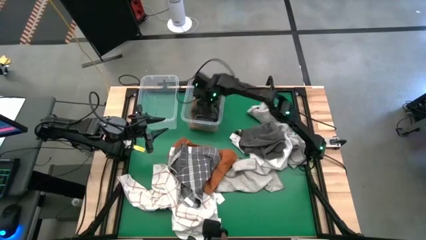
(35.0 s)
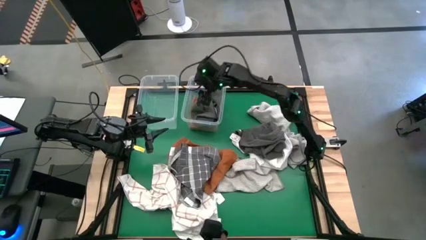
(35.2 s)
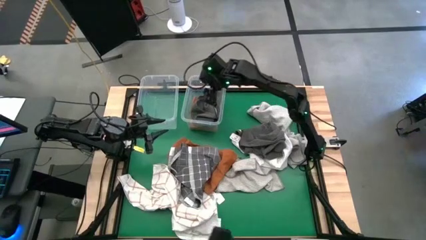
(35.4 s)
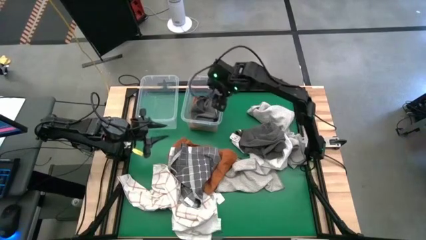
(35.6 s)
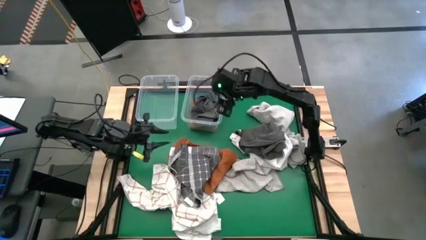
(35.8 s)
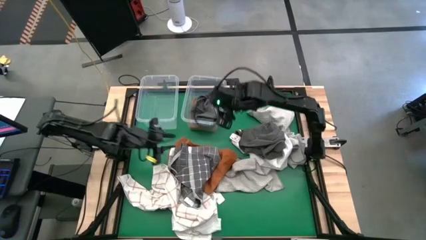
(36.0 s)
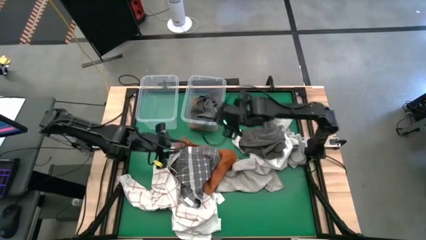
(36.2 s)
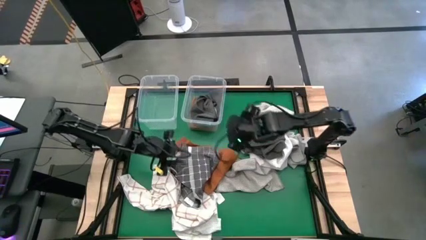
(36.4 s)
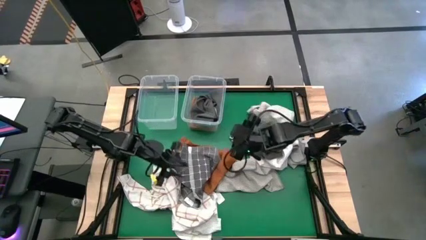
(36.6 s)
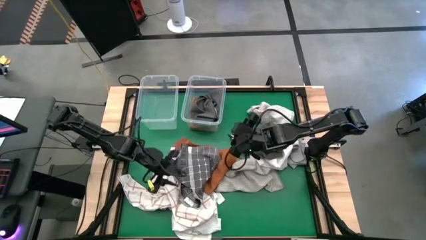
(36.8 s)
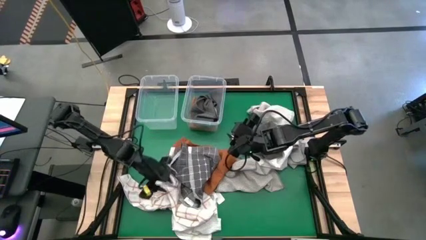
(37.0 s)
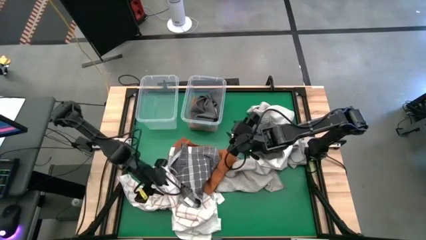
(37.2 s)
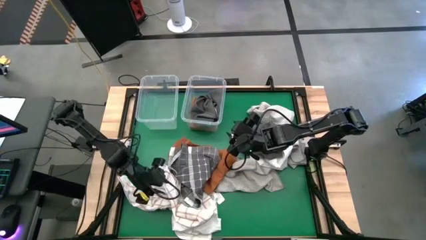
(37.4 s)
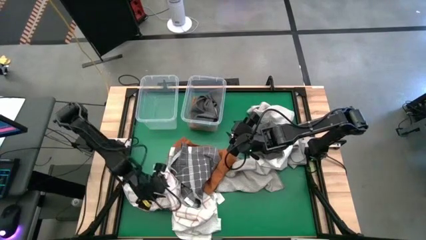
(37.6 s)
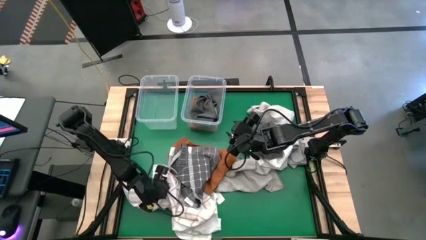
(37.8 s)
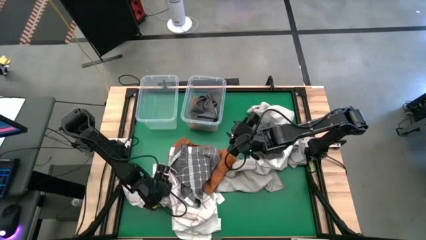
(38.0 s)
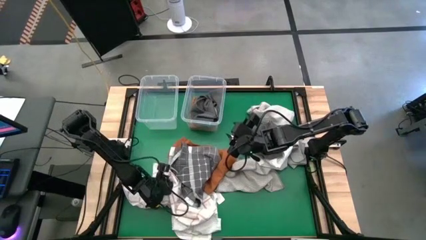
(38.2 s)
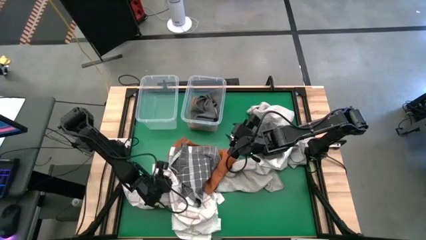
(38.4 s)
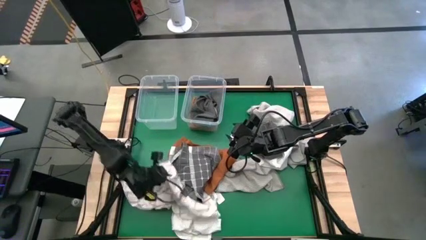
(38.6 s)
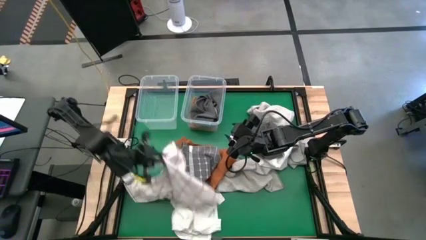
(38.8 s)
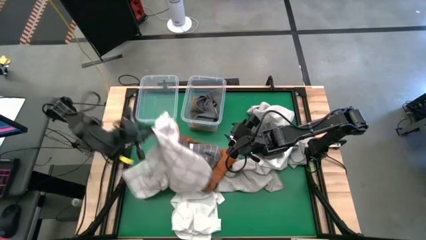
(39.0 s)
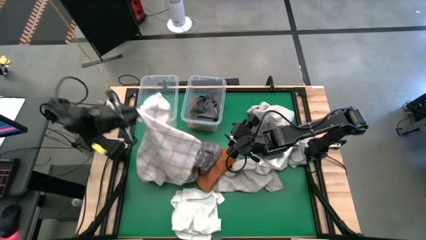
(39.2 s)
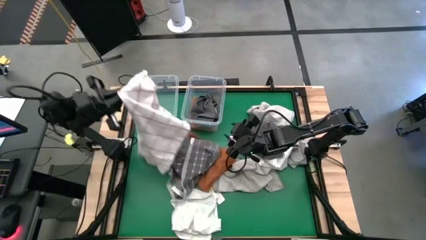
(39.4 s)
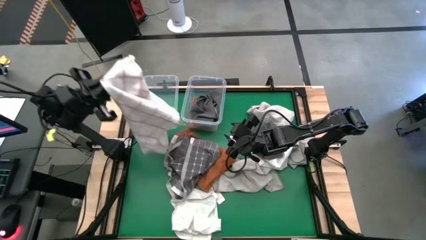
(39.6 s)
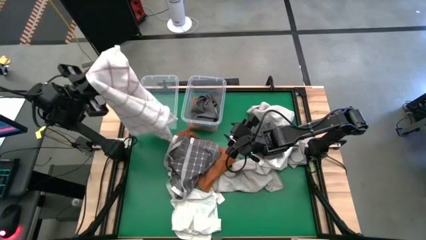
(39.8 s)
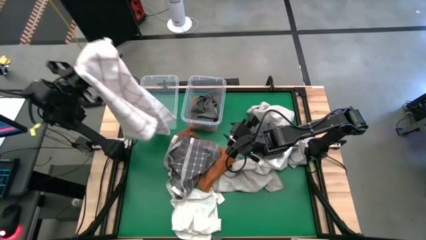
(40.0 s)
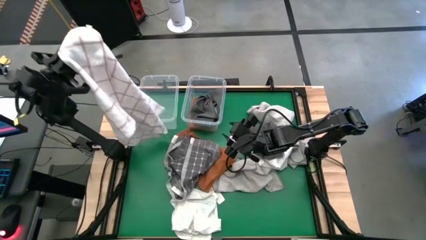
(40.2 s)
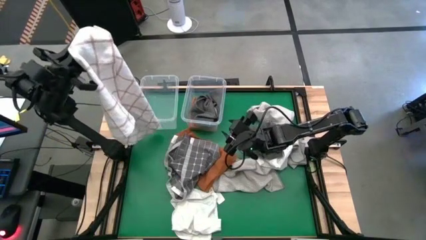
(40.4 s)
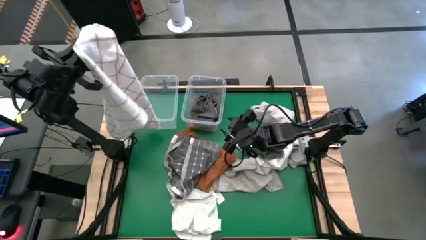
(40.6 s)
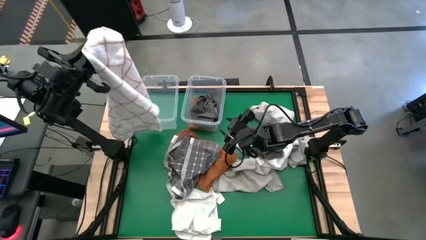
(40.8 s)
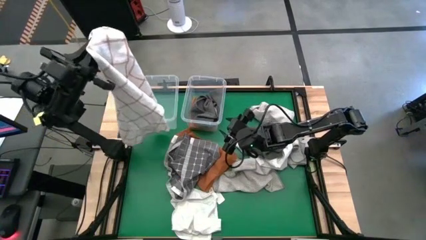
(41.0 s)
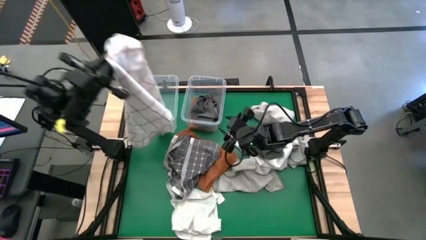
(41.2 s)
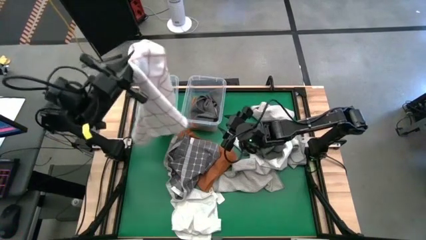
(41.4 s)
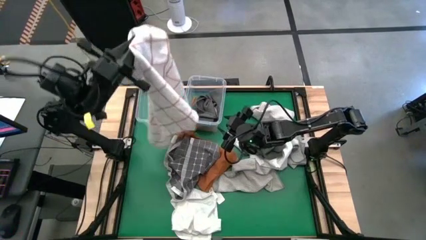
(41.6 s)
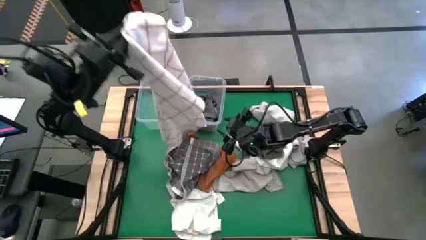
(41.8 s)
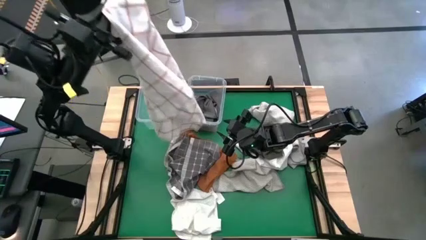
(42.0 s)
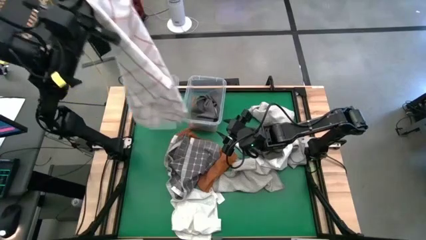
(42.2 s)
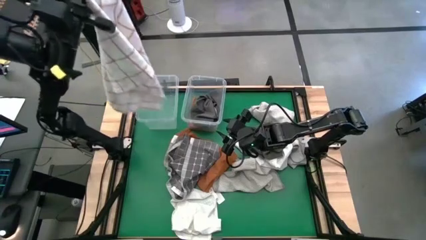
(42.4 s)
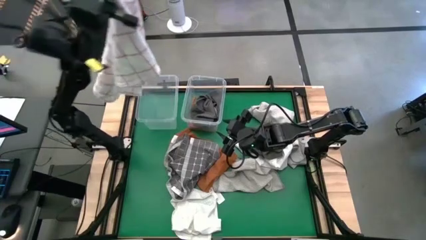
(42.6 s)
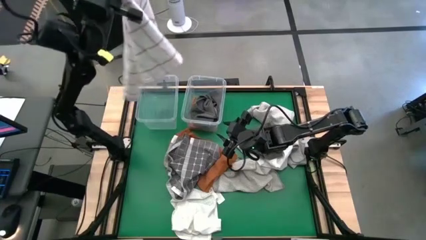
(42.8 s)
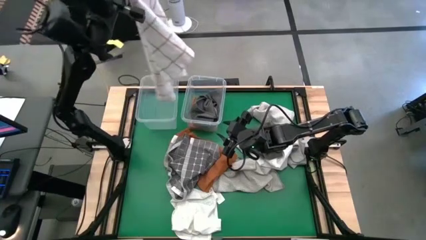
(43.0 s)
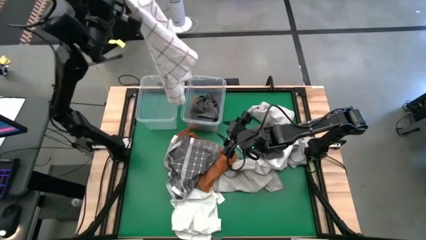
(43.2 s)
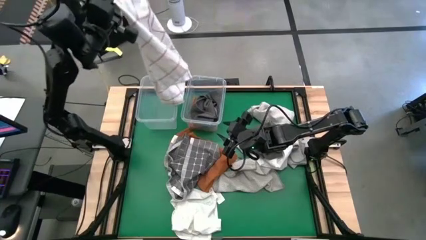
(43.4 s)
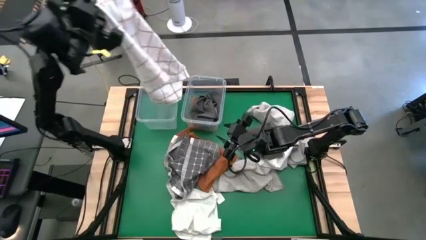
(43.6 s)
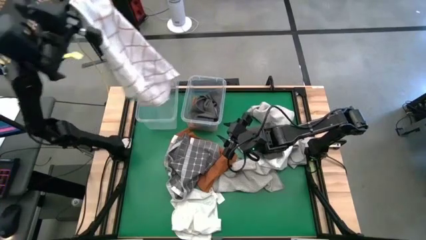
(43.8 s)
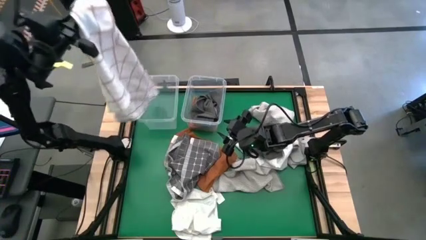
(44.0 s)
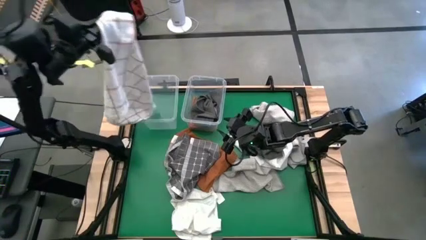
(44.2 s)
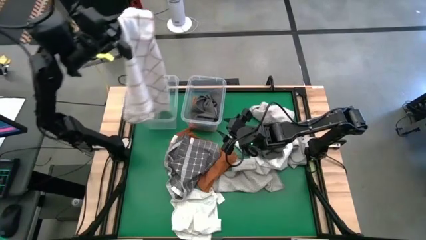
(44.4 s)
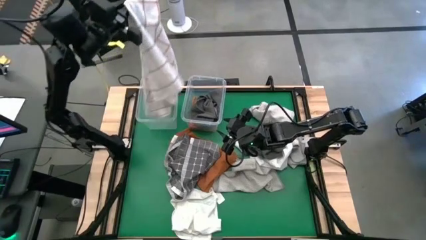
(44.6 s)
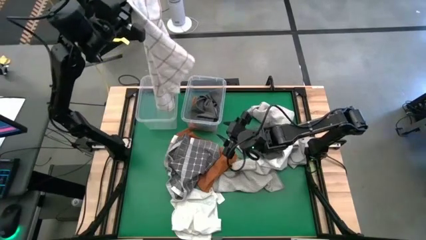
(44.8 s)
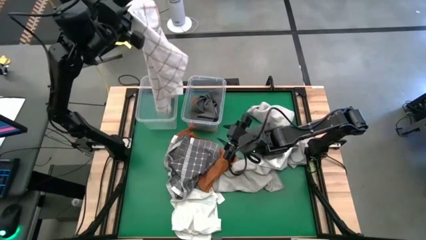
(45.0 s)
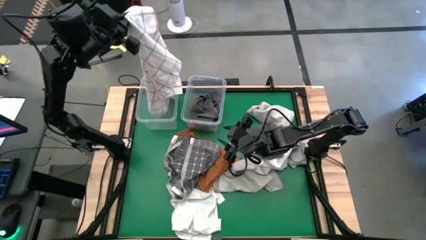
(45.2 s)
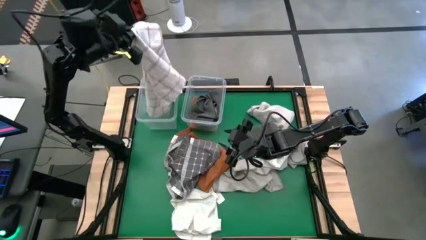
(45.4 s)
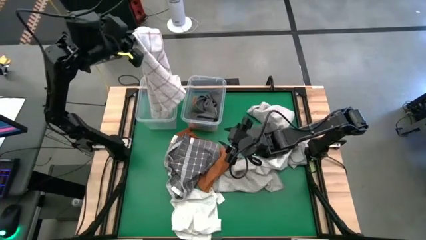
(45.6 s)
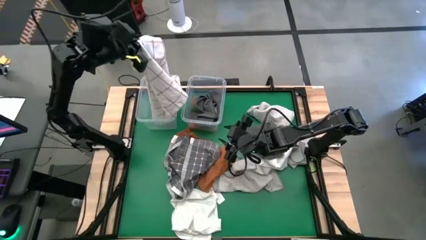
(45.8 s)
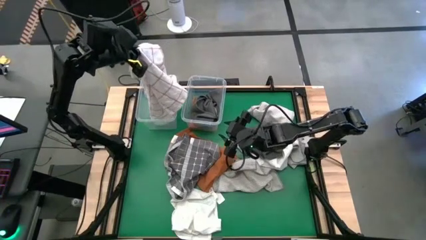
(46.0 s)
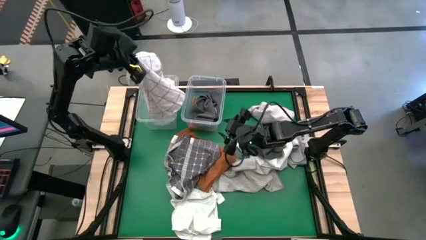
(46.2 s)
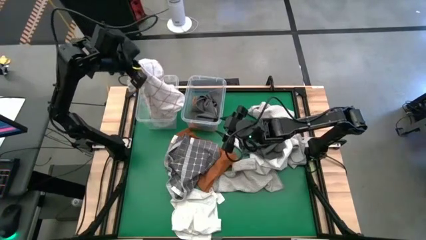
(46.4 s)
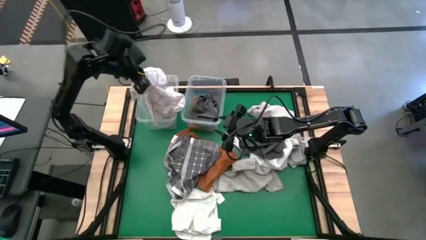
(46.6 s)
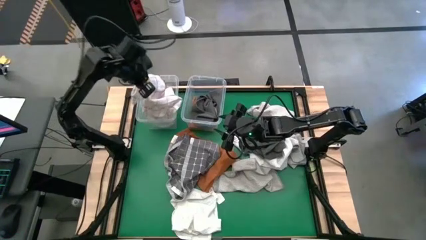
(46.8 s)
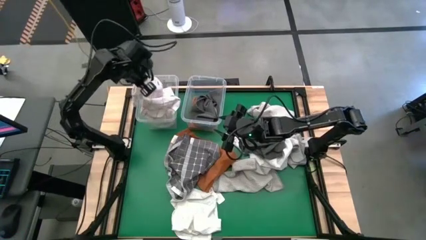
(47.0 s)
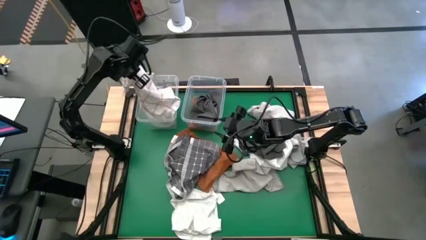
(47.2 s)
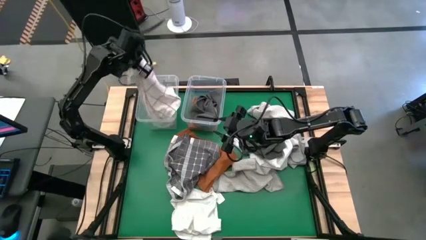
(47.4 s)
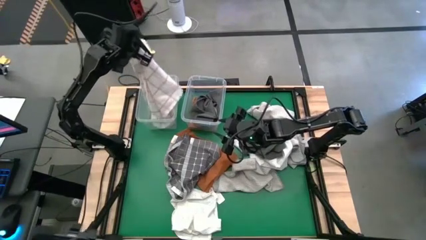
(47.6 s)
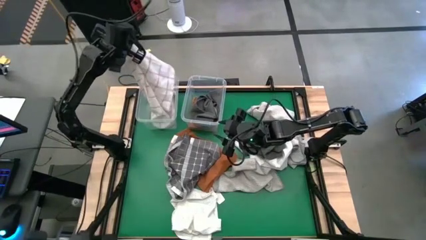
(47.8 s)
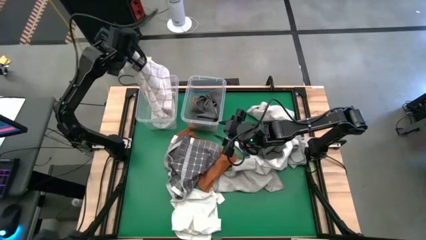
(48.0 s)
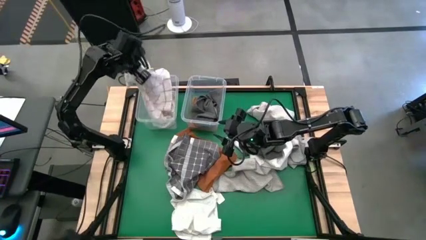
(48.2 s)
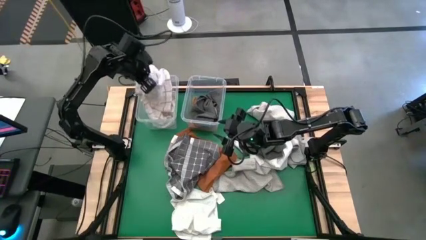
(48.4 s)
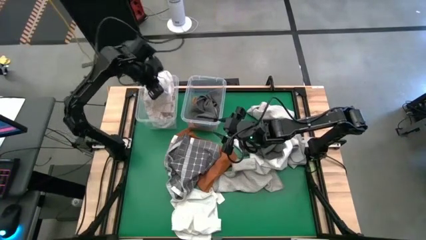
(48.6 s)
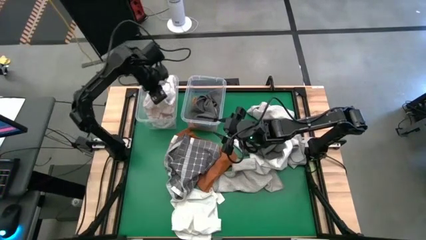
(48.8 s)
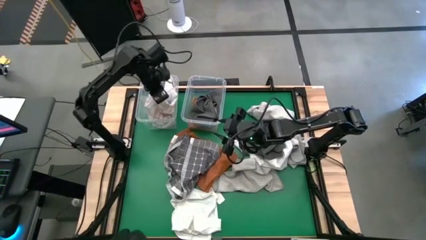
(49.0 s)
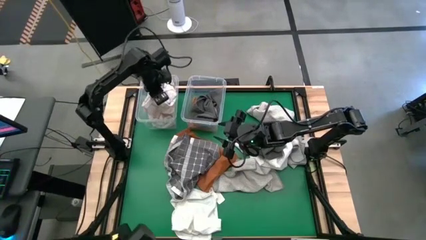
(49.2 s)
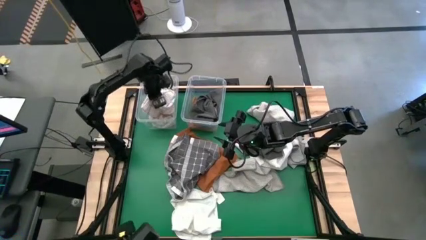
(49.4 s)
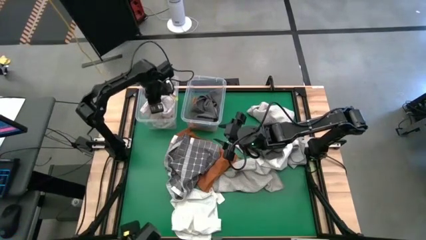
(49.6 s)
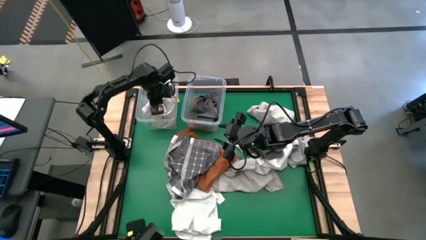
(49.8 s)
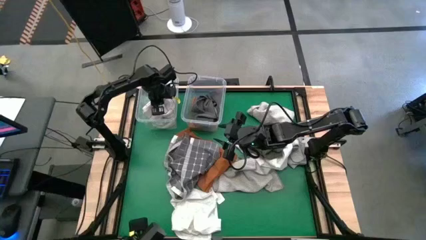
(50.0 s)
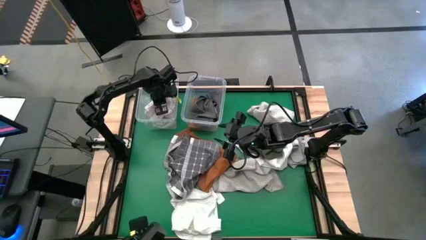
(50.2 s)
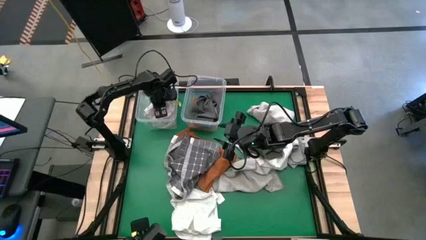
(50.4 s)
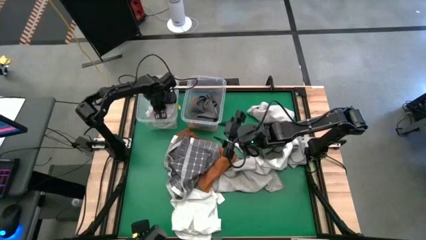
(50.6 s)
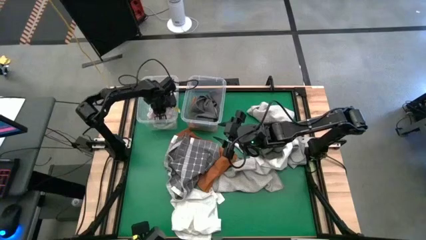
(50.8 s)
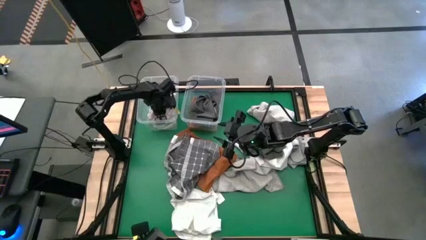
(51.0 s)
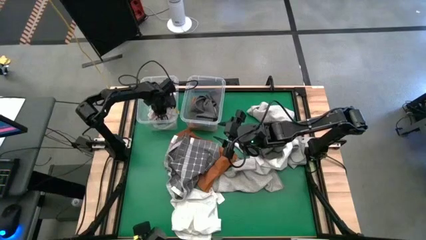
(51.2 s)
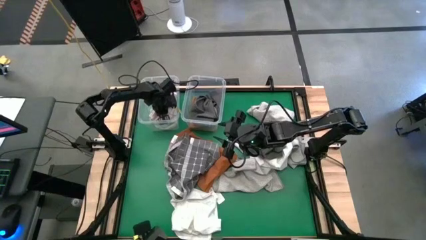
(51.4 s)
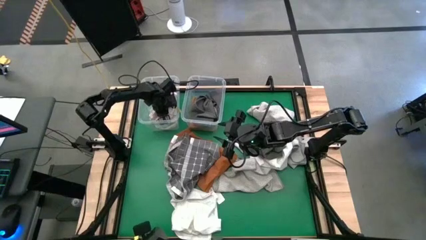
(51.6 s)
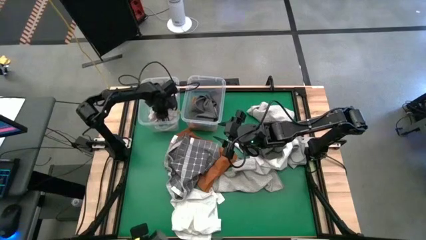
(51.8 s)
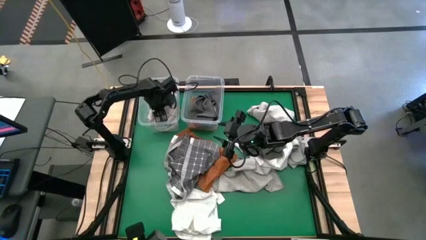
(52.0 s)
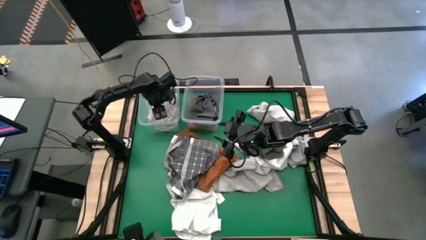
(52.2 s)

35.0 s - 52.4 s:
Task: Sort towels by color in basket
Put the white patterned towel into the left transparent bin
